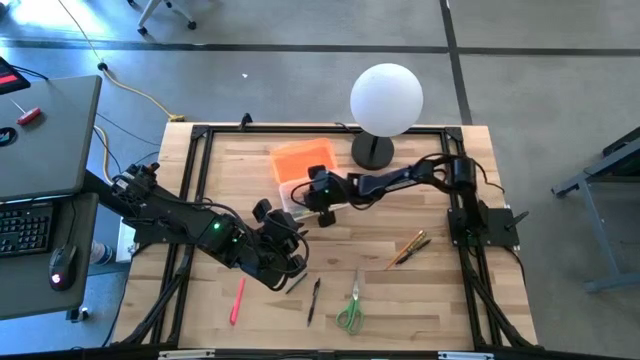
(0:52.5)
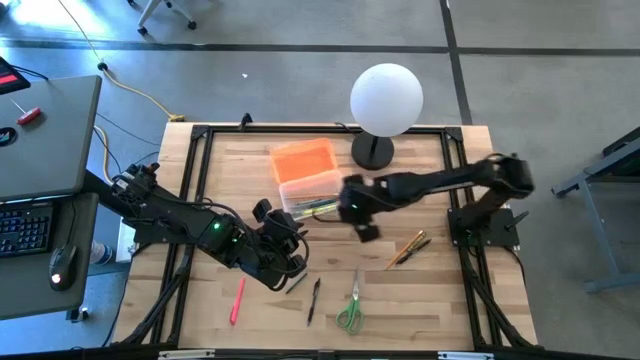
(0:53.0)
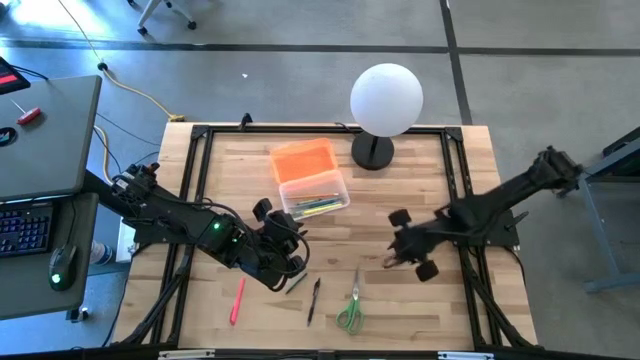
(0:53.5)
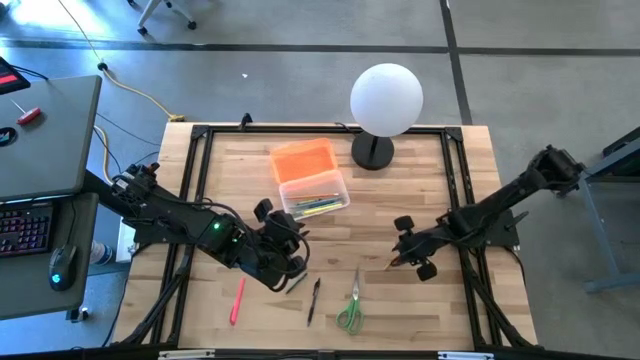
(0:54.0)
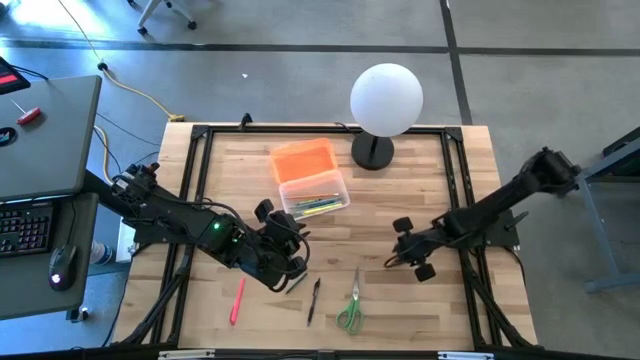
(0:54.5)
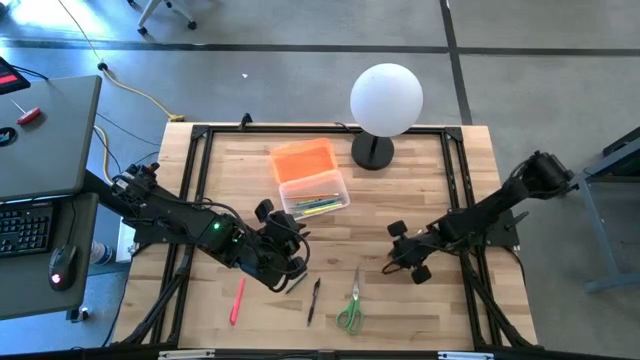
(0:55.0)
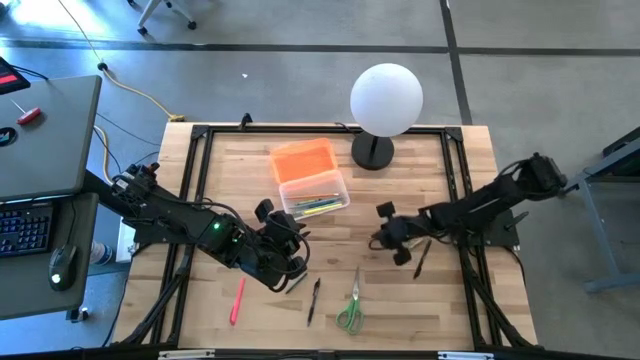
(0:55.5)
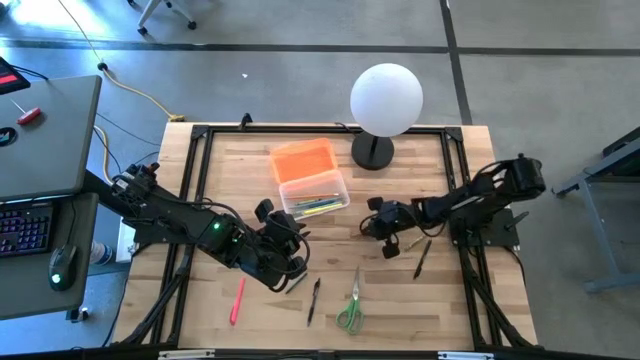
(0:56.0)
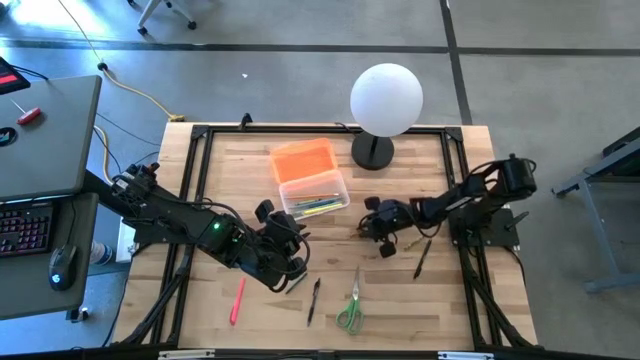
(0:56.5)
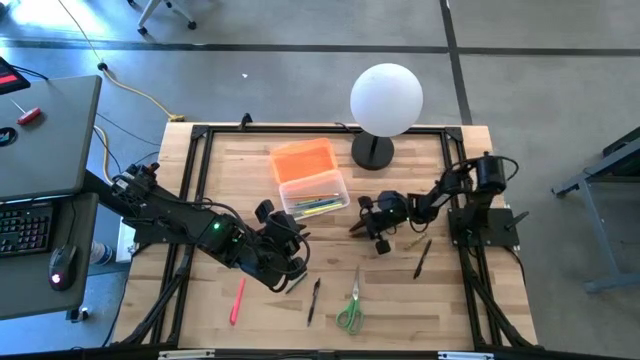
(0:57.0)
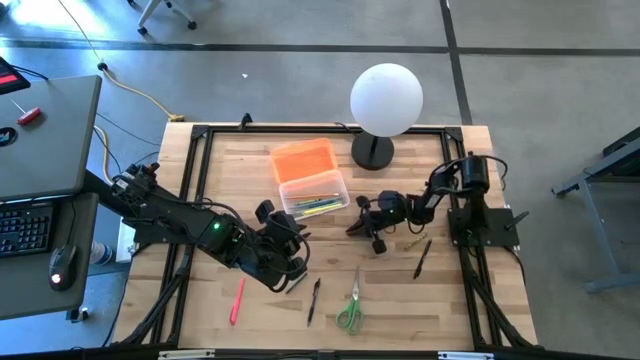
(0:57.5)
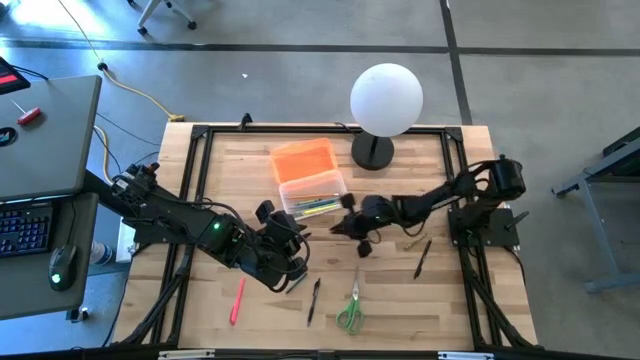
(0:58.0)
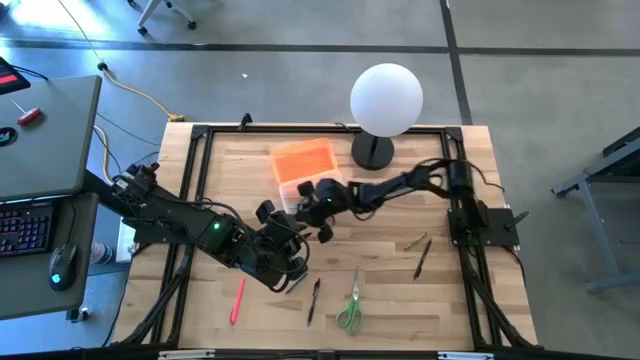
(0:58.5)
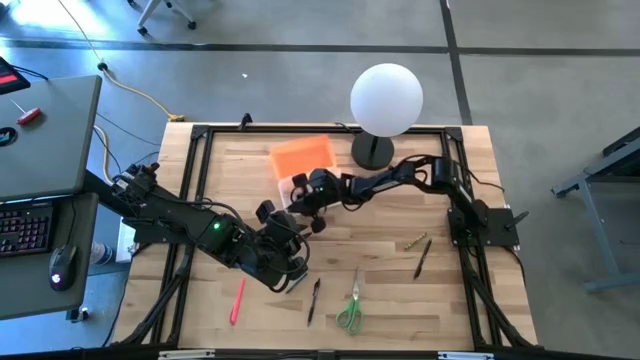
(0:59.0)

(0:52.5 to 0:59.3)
Task: Pick & place school supplies into a supply box
Put the orange pencil into the transparent supply box

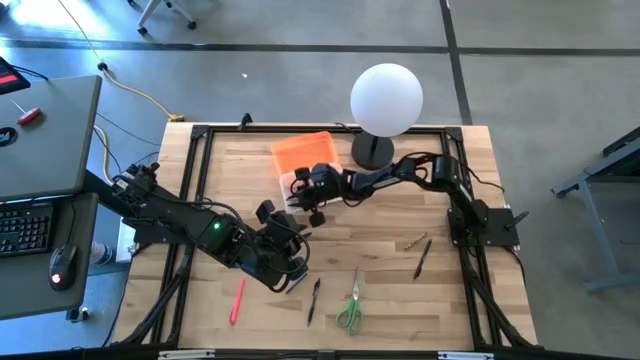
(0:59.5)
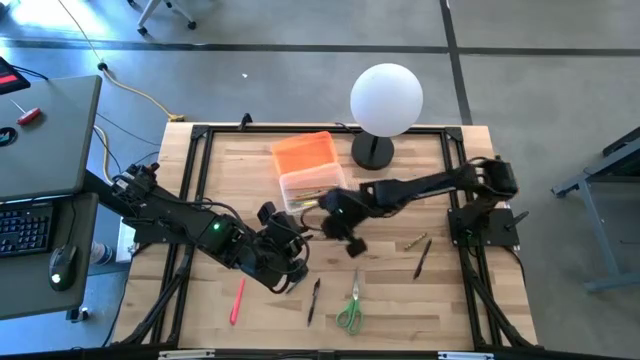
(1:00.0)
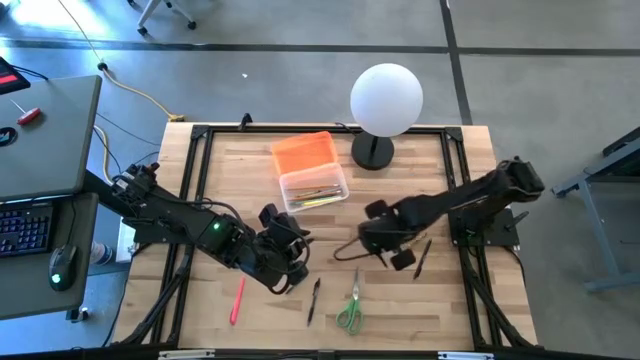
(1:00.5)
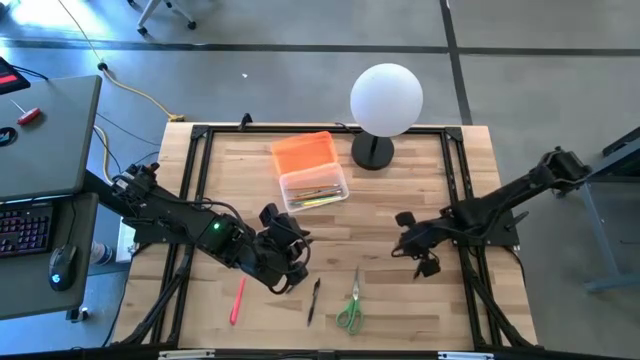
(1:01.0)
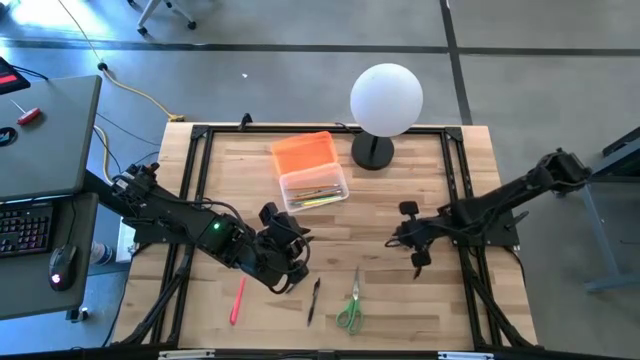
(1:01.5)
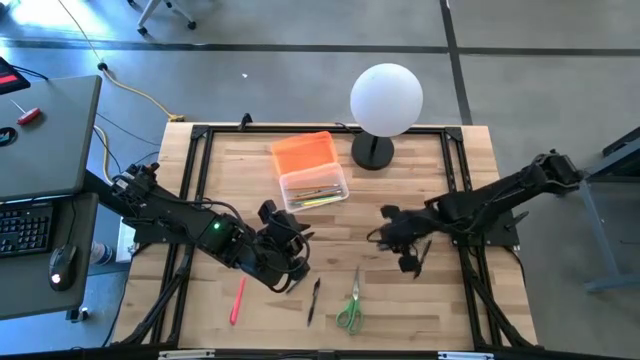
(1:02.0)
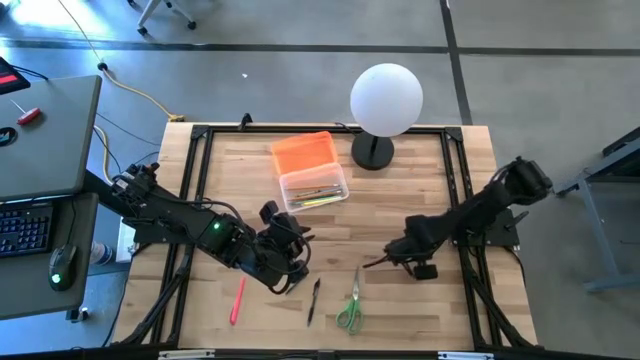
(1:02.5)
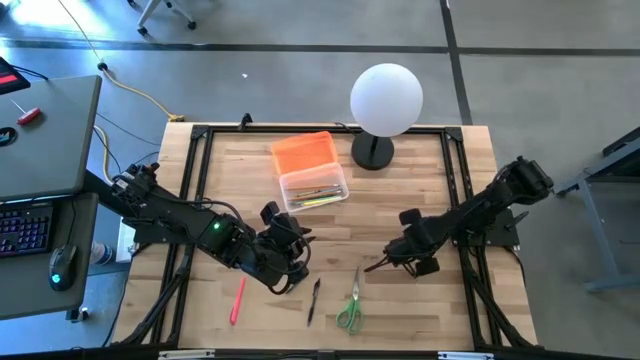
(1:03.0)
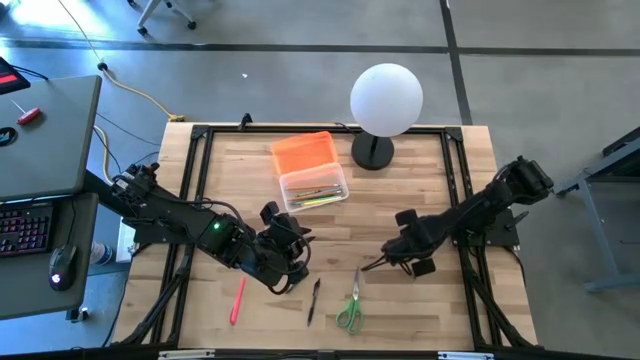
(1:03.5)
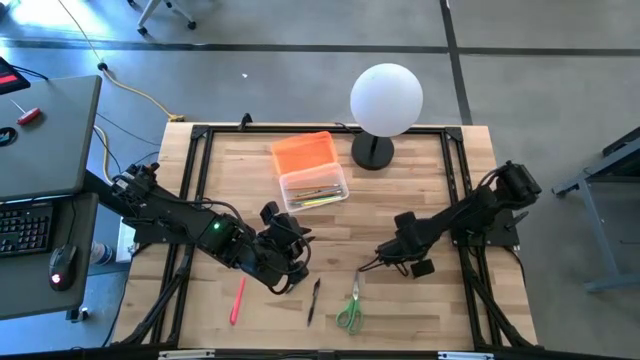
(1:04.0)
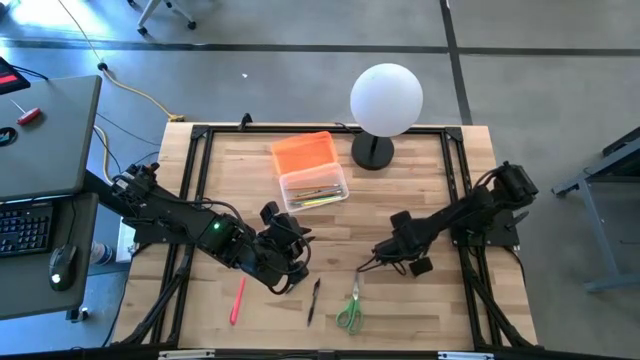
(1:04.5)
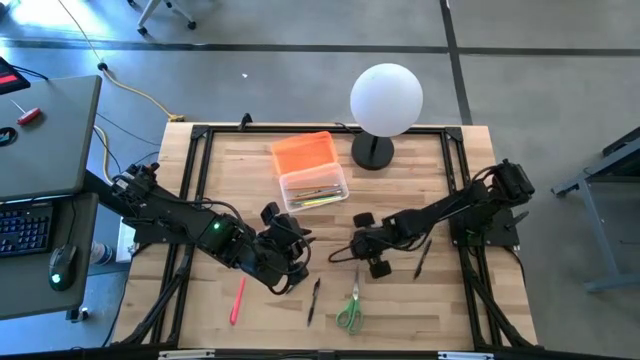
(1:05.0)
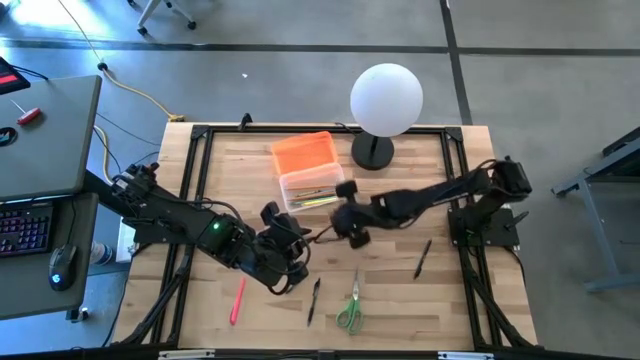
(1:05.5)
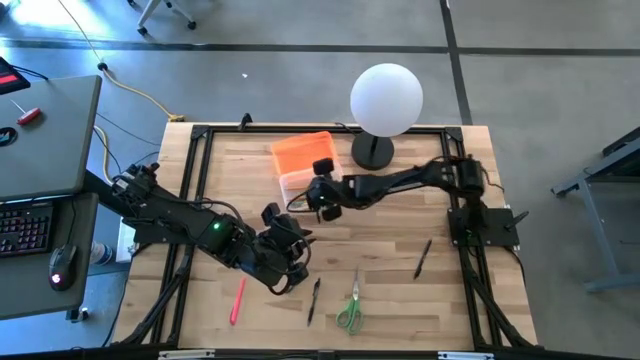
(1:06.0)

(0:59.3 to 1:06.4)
Put the green crayon into the transparent supply box

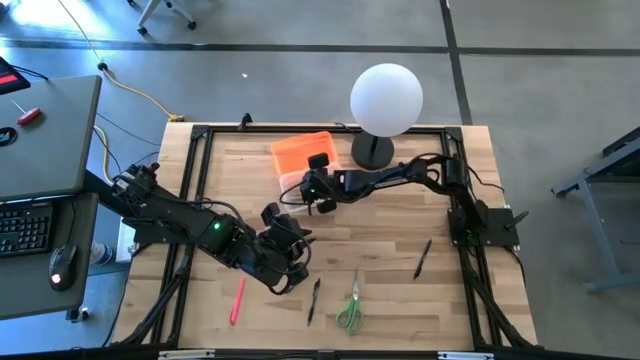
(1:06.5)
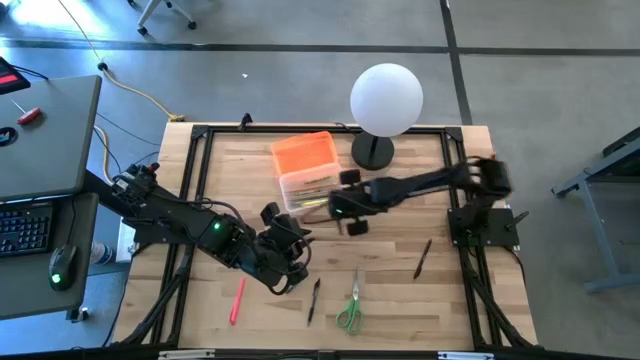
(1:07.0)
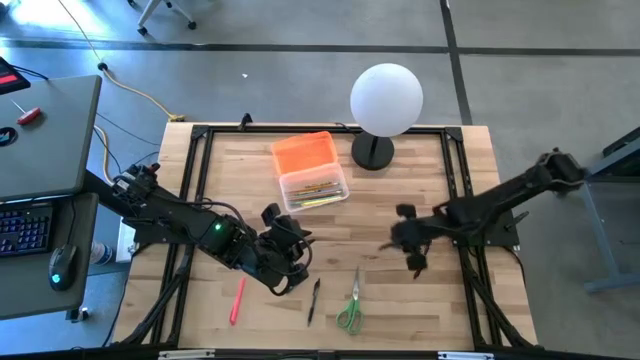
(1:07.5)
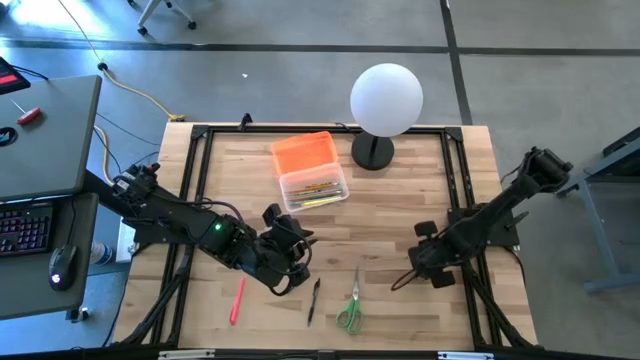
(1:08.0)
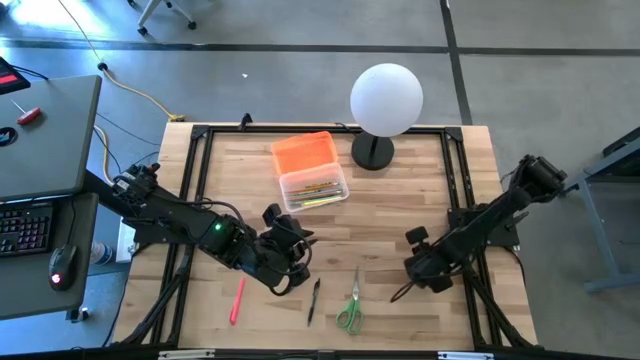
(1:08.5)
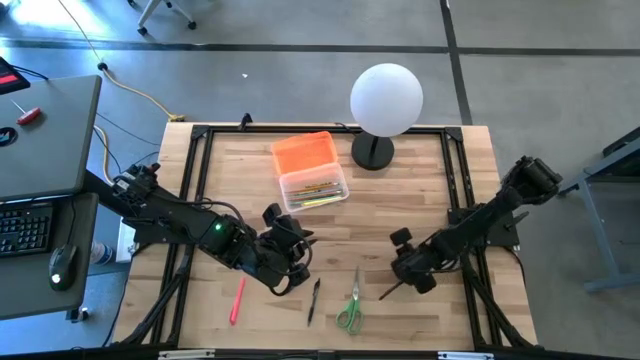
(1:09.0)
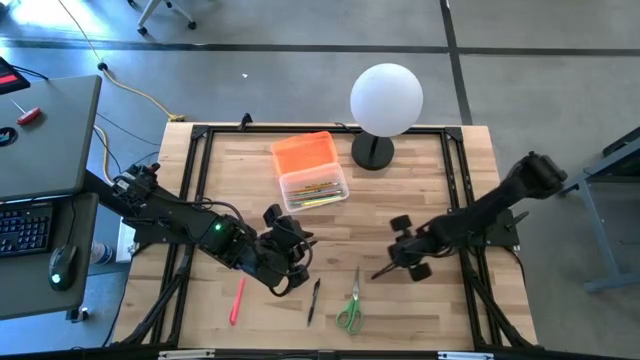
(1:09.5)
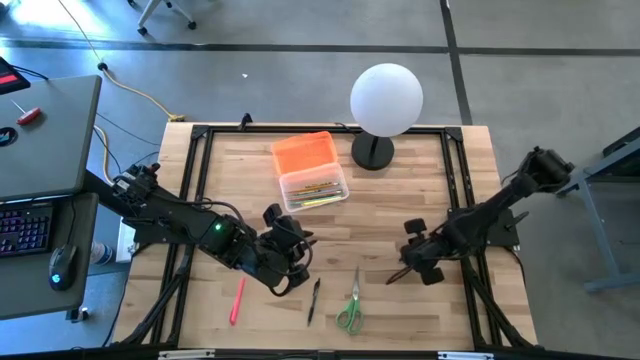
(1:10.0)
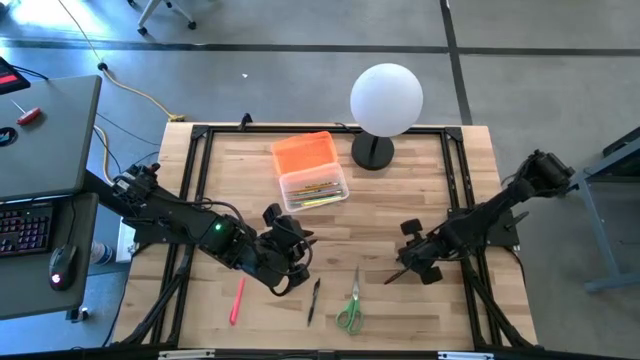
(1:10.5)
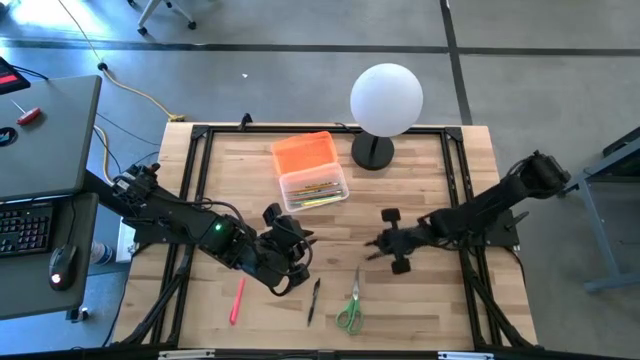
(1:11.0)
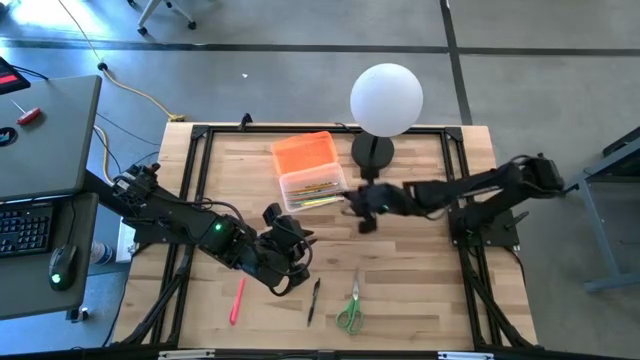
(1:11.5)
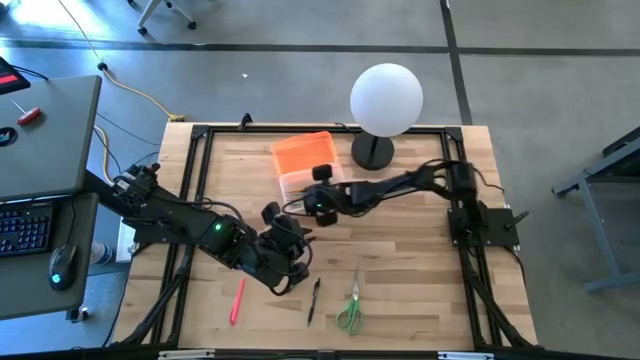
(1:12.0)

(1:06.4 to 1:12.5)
Put the black pen into the transparent supply box

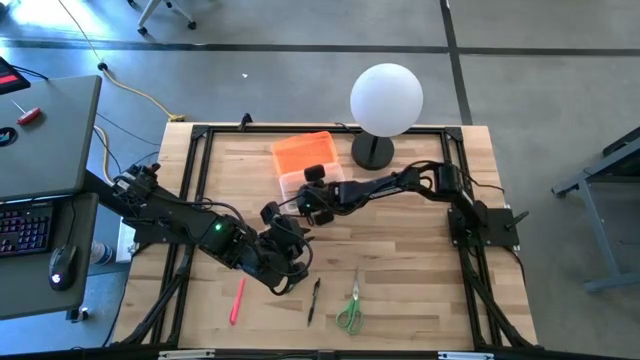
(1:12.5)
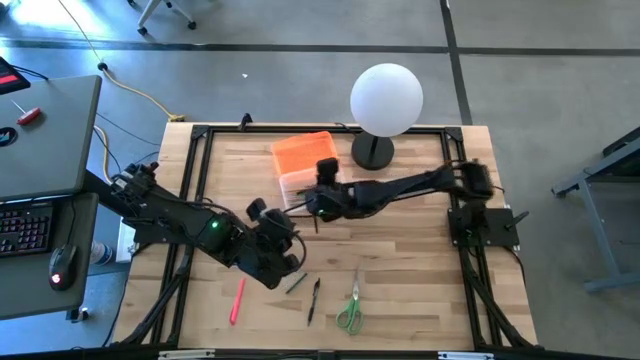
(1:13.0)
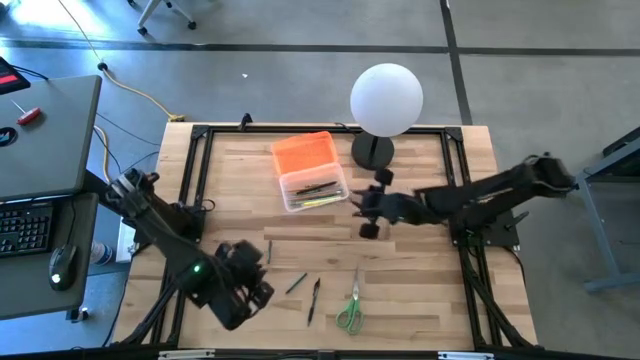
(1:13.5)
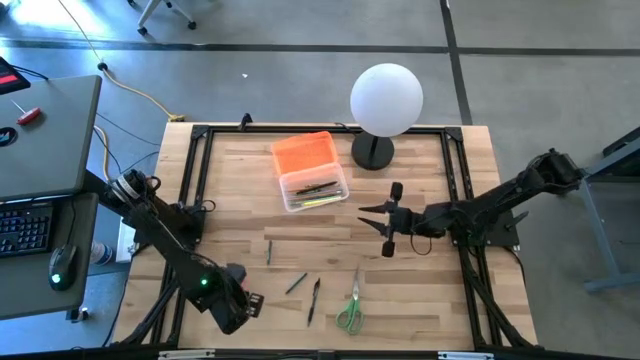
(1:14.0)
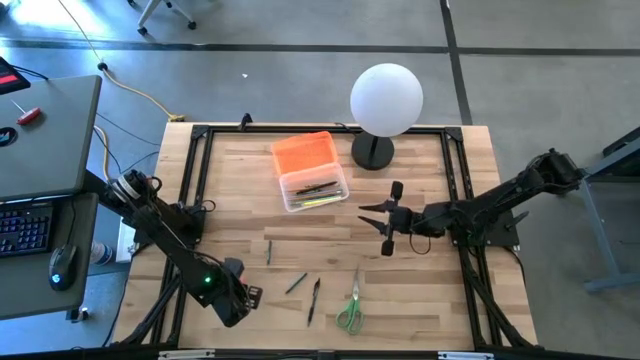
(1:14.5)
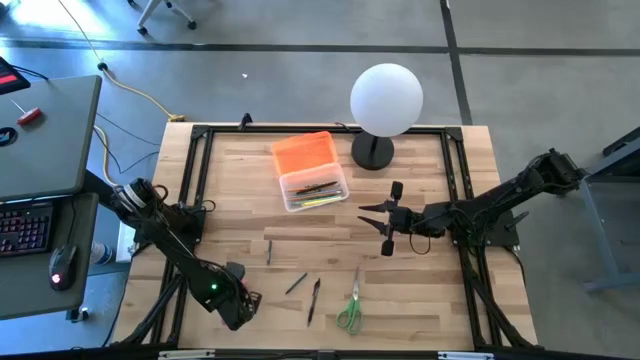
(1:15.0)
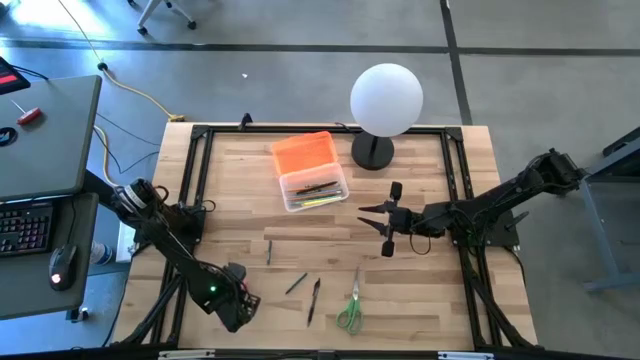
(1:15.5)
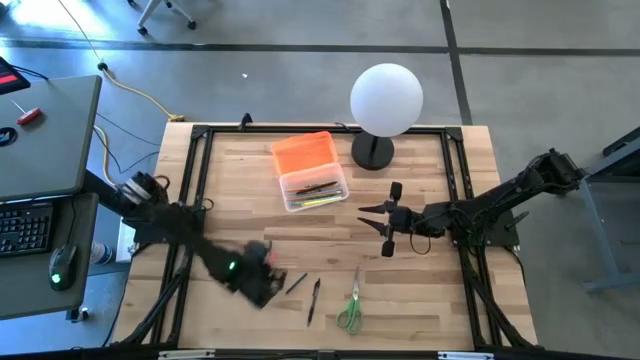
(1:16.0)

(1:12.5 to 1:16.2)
Put the pink pen into the transparent supply box
